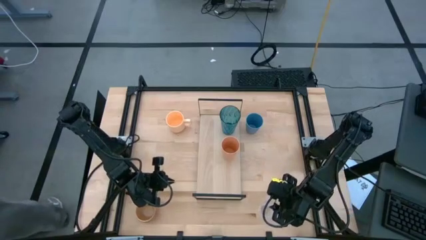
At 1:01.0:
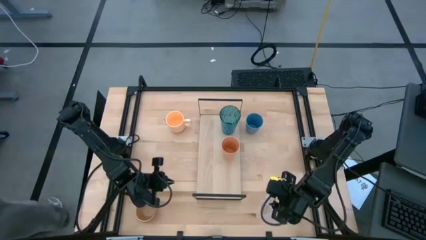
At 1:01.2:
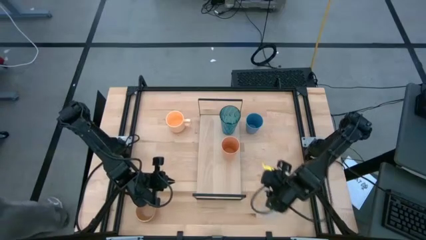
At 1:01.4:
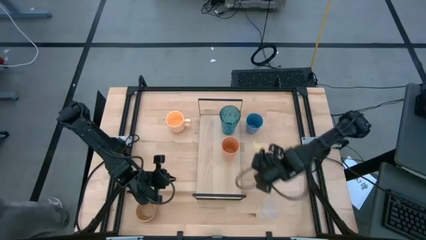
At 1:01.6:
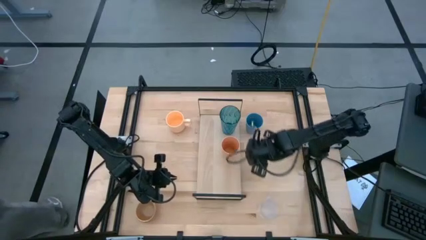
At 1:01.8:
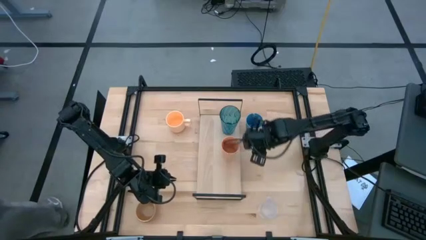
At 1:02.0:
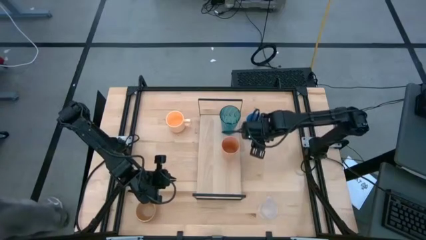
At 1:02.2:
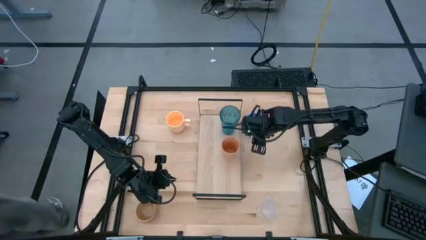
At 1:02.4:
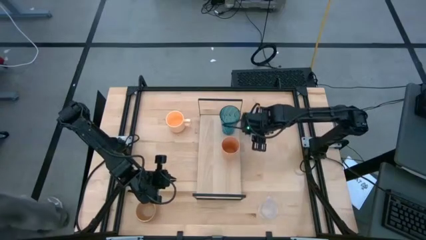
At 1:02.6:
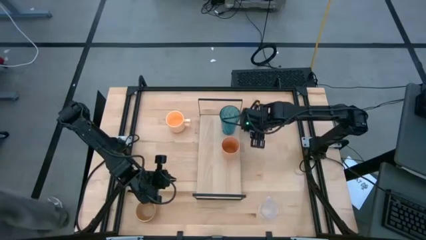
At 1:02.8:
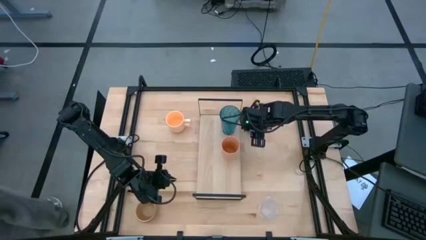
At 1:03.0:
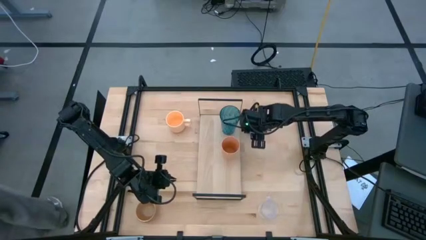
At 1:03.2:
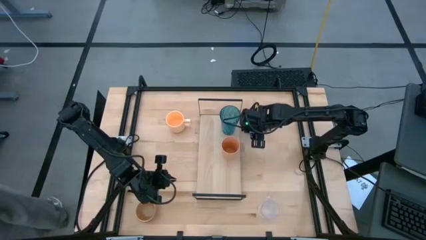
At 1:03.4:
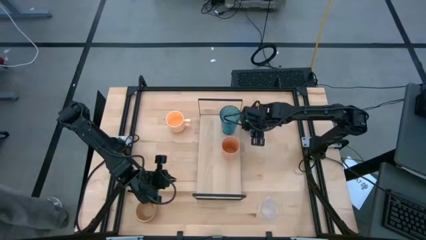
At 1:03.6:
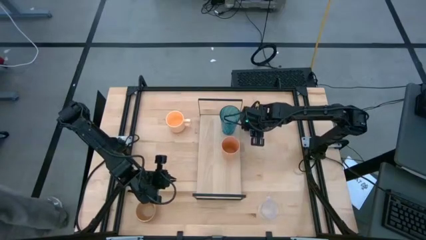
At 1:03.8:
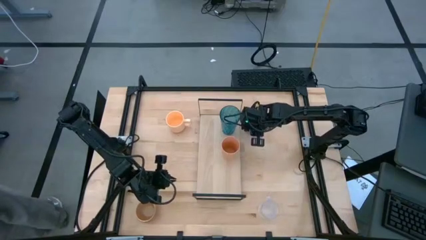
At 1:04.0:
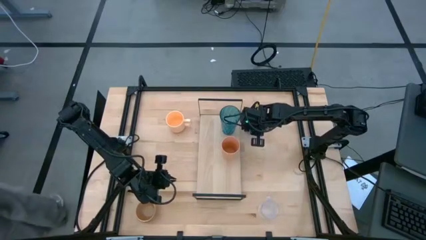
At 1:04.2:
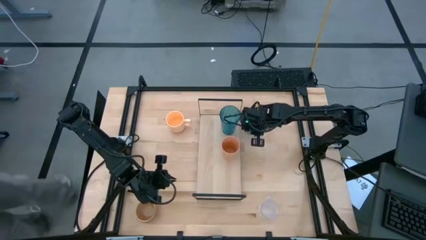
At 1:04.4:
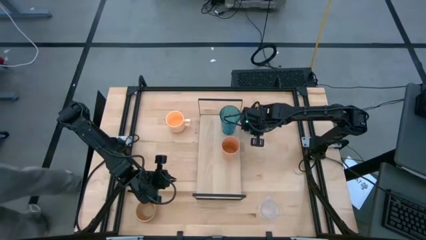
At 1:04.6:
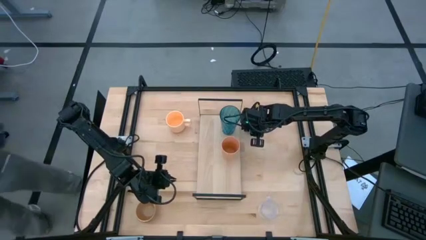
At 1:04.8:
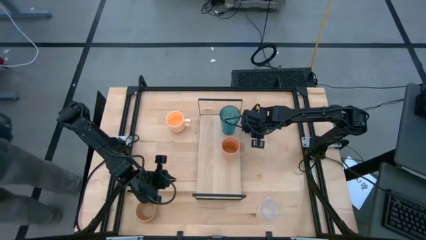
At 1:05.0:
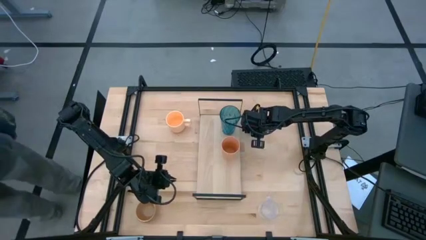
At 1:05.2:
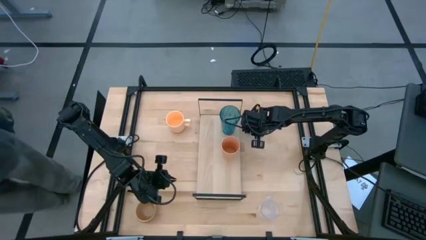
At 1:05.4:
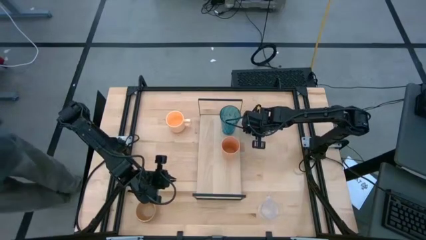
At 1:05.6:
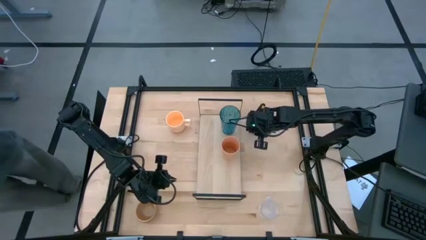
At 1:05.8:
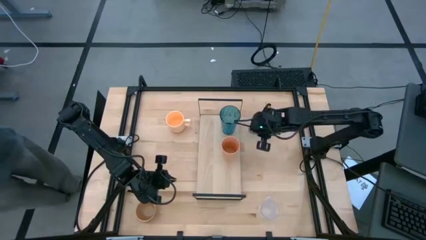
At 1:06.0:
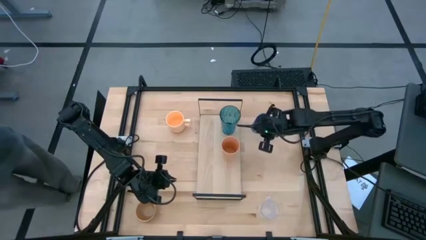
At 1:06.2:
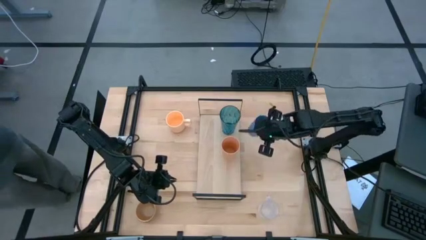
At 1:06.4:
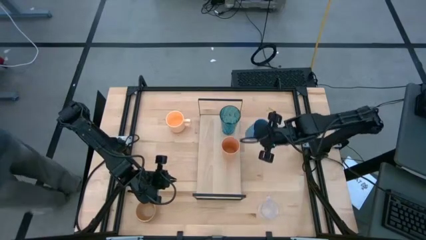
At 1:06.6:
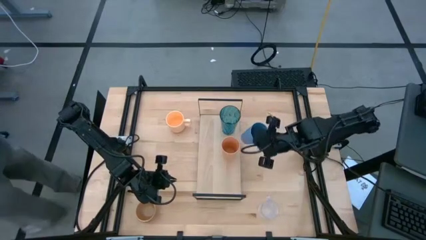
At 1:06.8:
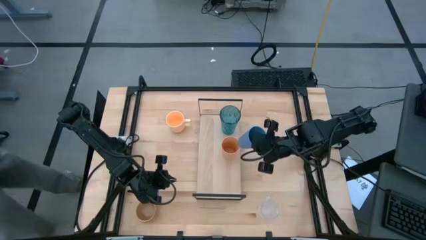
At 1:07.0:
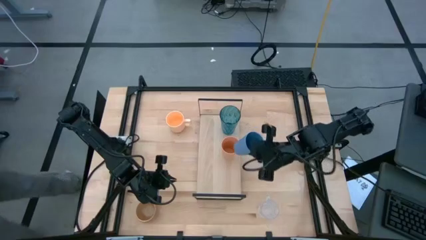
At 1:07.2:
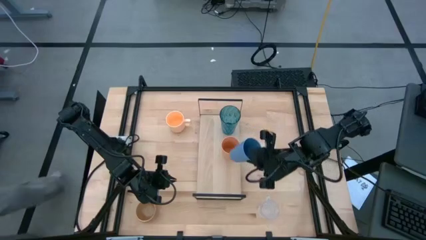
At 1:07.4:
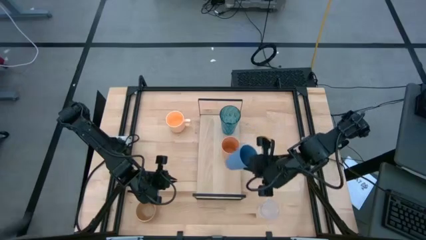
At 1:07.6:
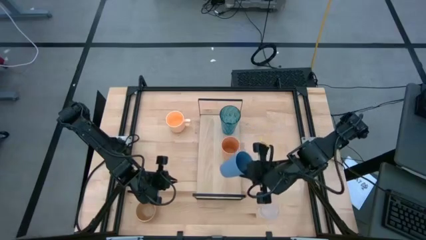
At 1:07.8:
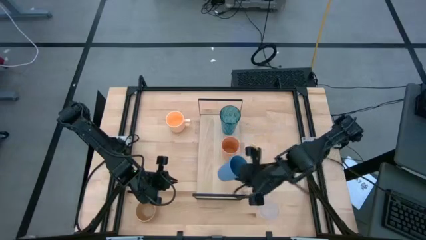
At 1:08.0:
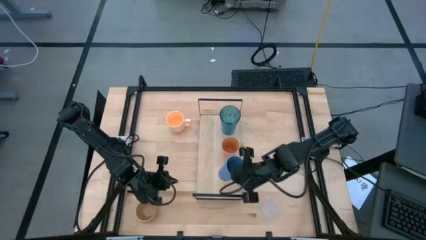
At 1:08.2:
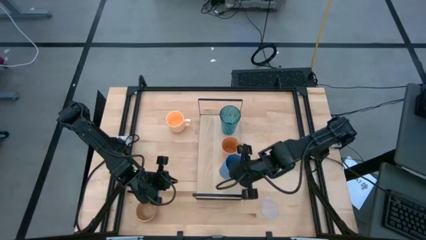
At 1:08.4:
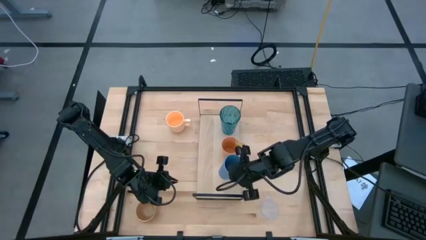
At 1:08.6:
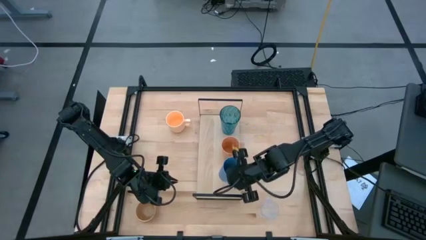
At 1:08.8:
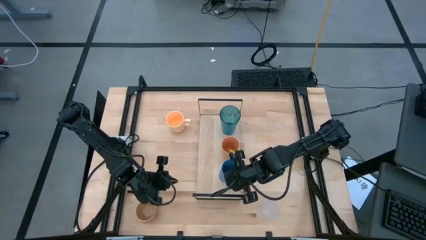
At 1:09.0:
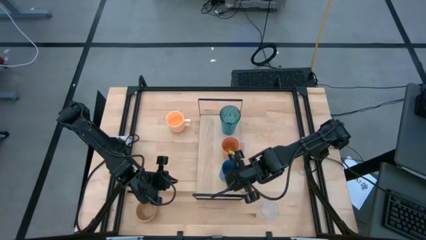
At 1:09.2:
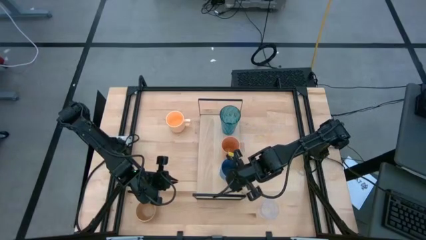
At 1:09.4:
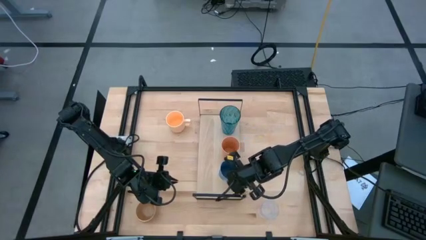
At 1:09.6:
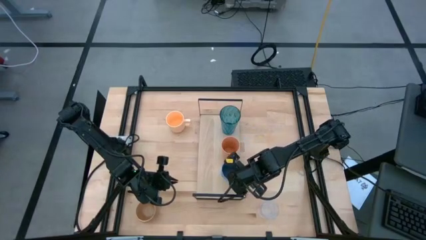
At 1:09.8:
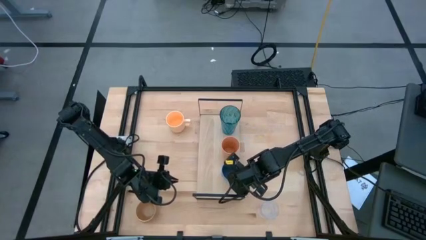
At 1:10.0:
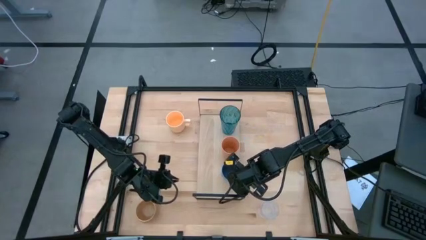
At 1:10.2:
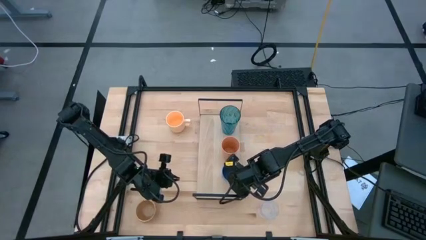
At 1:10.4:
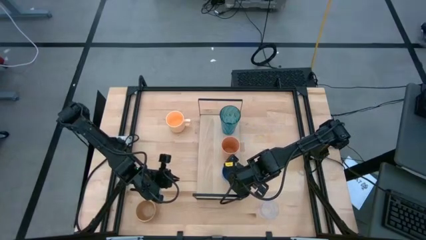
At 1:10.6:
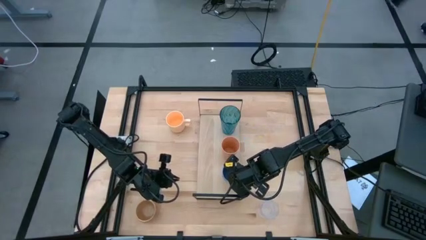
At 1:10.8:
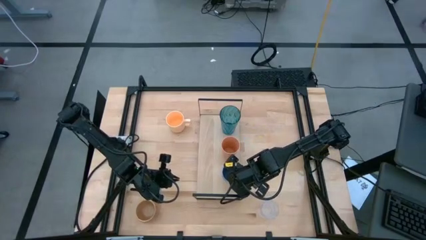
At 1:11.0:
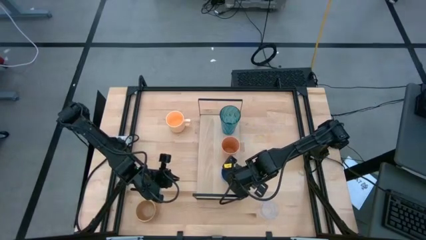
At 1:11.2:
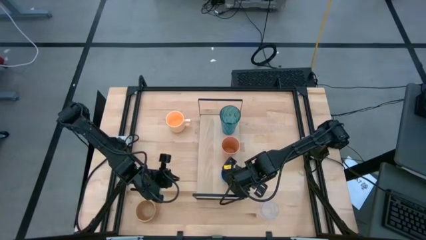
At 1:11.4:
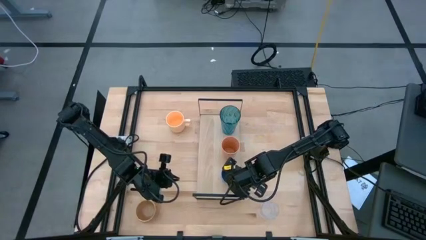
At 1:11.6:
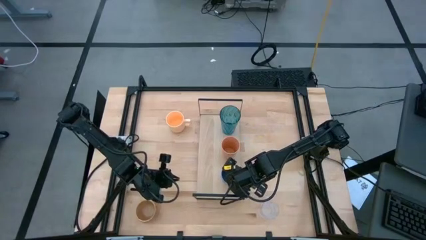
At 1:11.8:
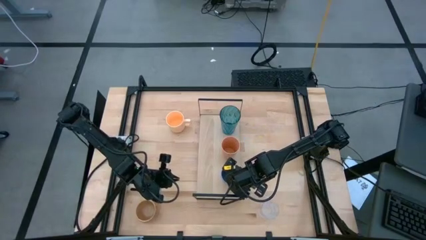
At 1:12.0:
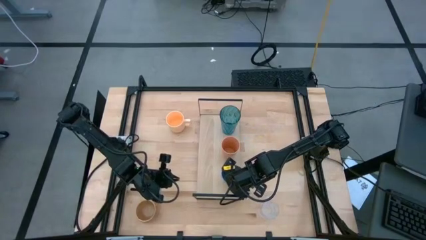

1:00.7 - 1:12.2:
Task: Stack small to large cups/mugs on shelf
Put the blue cup on the shelf
